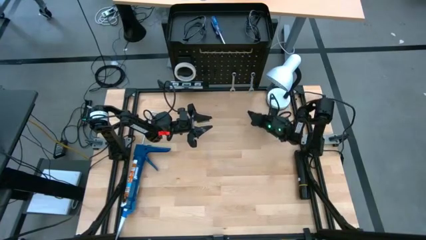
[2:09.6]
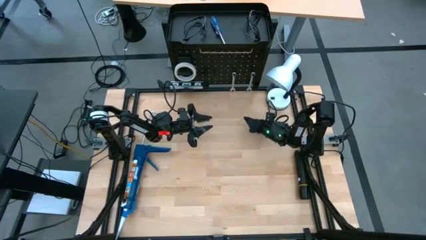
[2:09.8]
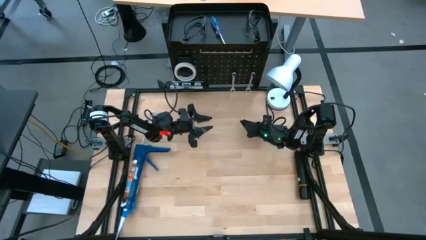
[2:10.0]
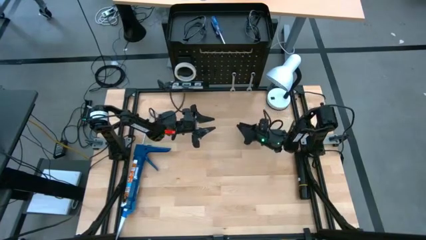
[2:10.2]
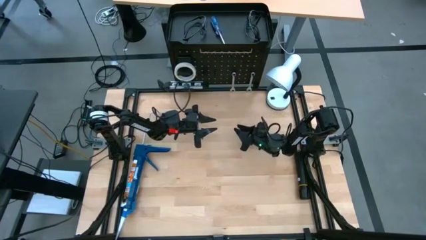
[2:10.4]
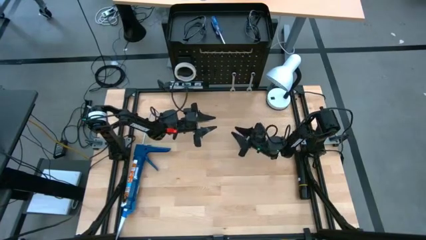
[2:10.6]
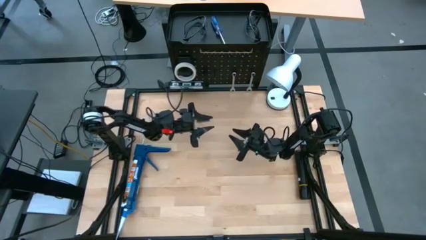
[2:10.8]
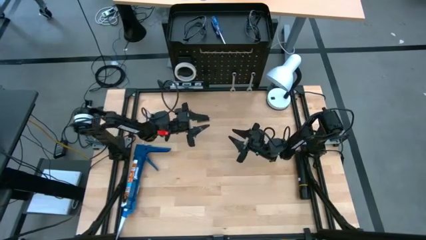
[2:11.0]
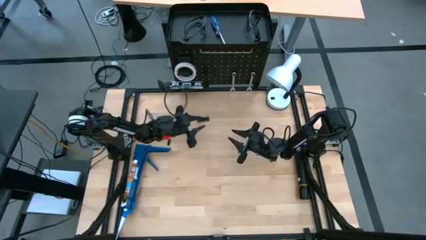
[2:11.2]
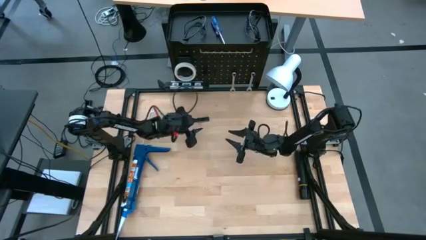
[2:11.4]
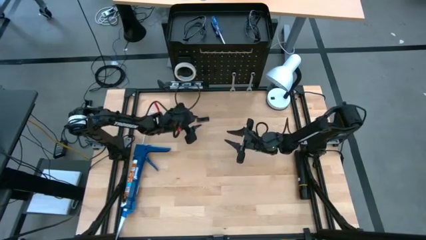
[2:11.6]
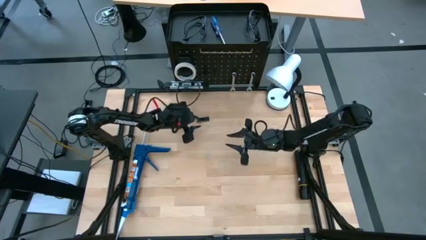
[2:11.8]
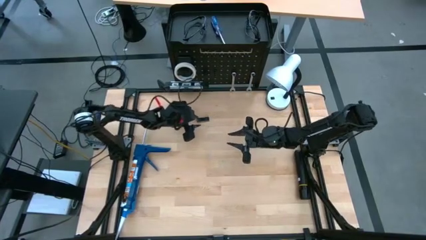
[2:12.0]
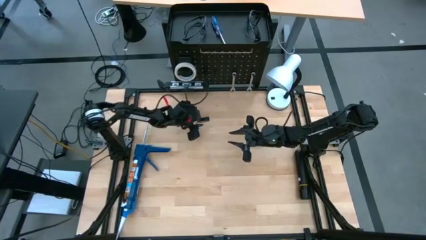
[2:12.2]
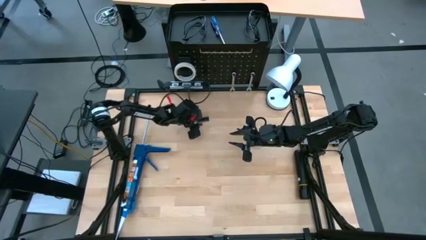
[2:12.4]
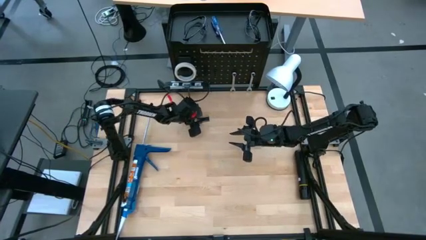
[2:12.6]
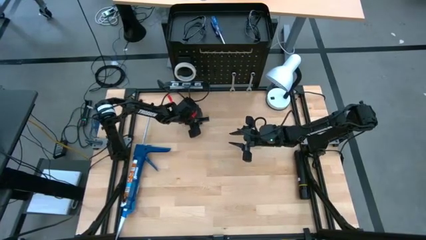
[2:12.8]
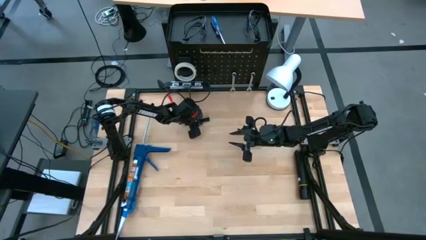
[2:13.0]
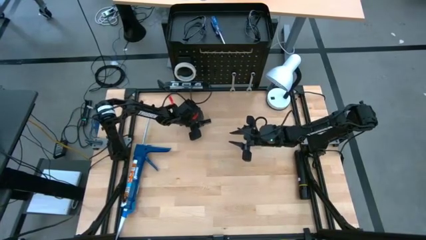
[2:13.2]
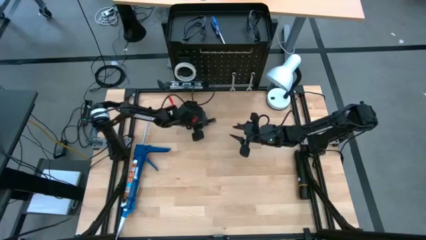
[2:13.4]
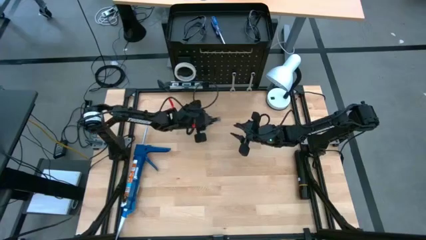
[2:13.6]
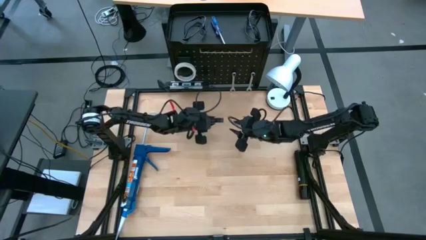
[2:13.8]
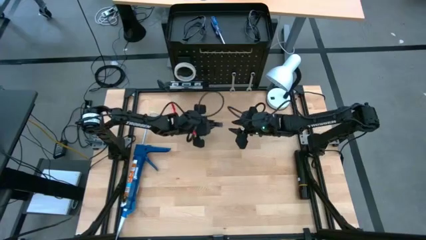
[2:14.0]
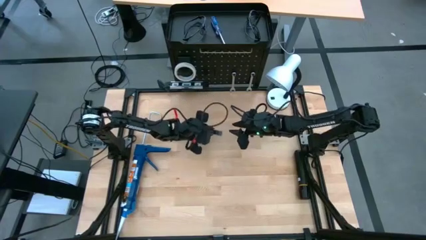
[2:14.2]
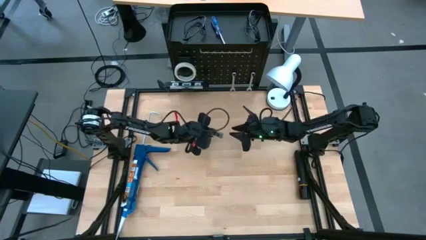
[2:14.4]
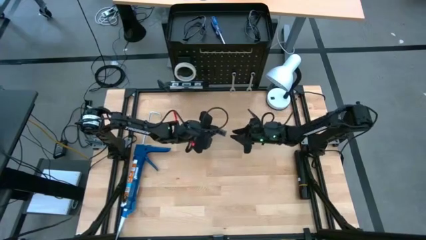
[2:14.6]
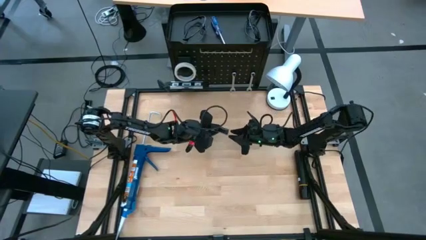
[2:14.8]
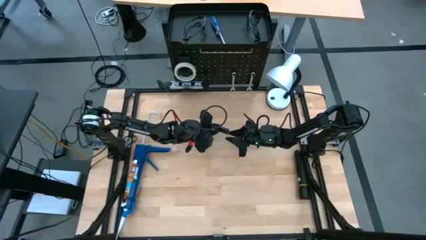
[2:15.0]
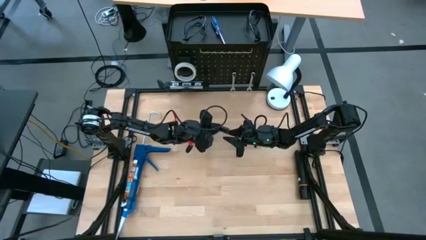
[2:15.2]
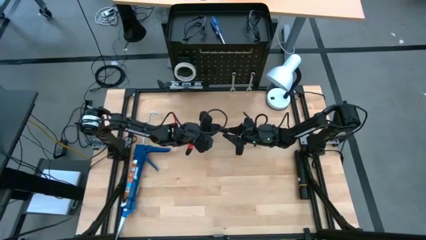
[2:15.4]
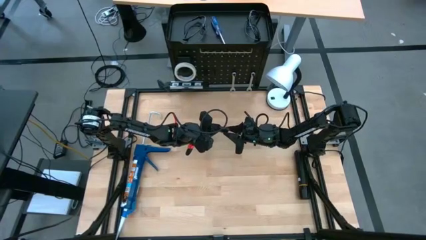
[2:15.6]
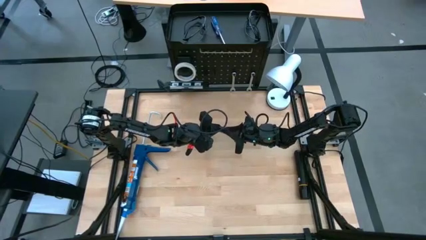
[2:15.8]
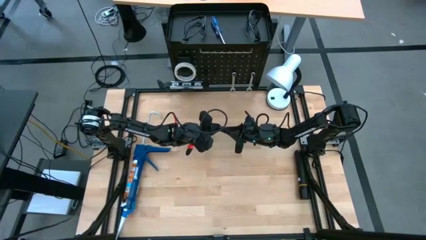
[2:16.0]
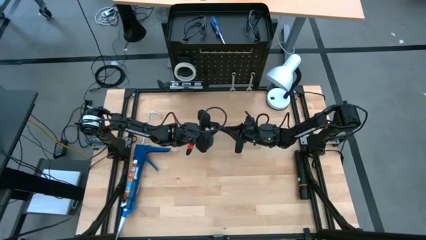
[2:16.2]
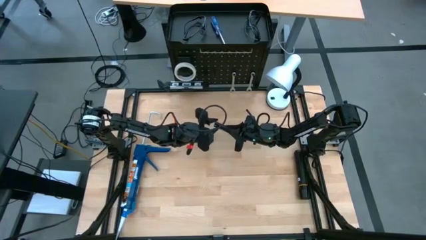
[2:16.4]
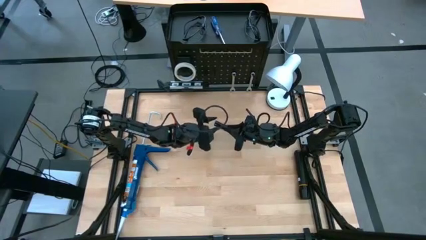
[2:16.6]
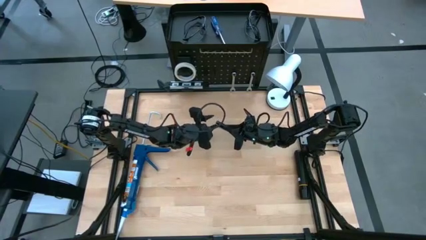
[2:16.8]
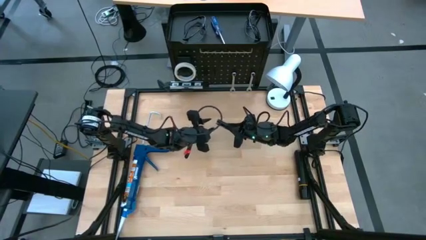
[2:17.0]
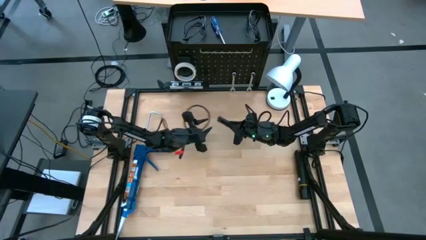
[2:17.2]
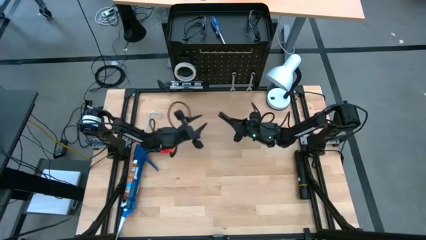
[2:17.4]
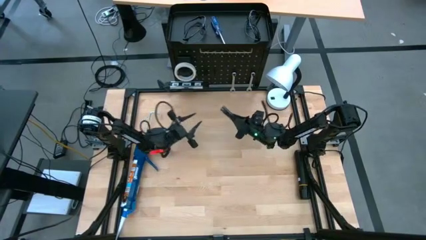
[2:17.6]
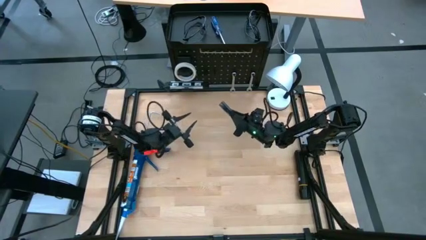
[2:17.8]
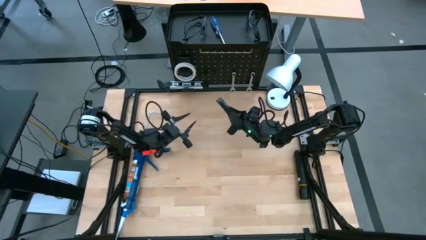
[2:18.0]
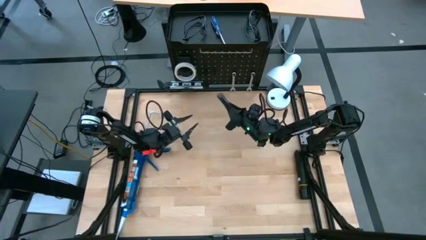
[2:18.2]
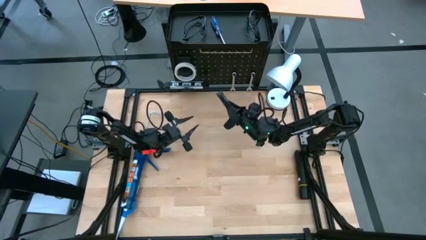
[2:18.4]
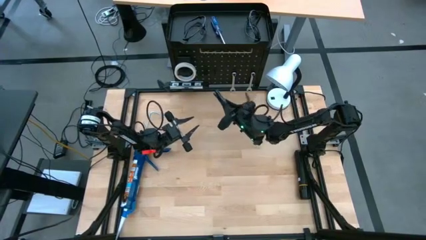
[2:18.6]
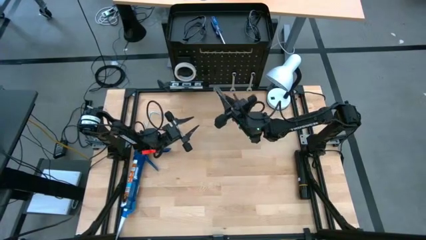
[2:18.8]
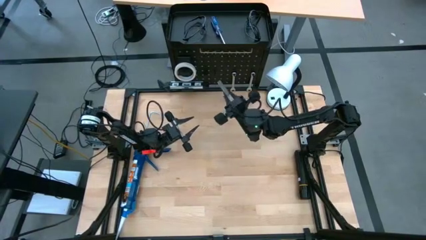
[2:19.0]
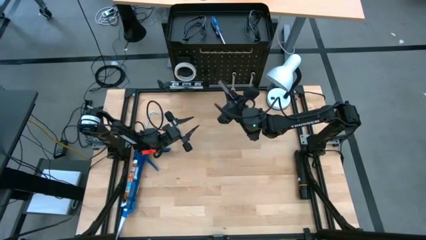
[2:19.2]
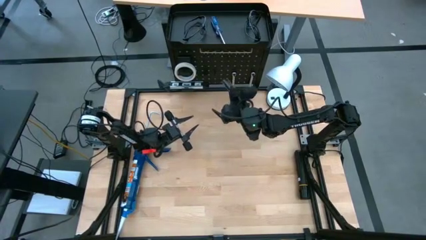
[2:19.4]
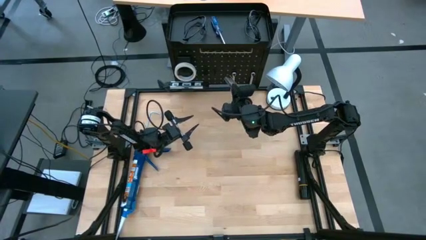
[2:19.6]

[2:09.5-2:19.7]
Task: Hang tools onto peg board
Hang the rectangular tool on the pegboard
